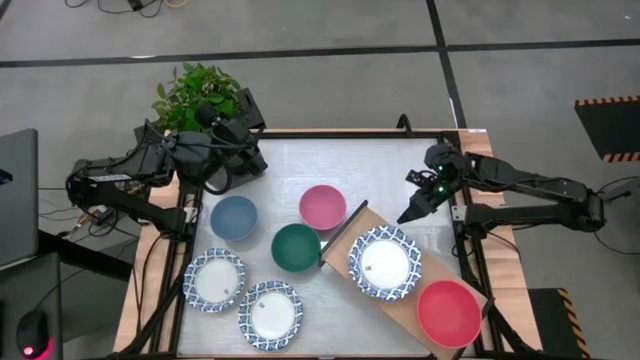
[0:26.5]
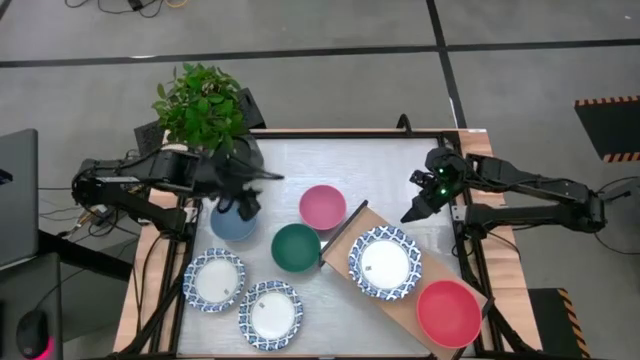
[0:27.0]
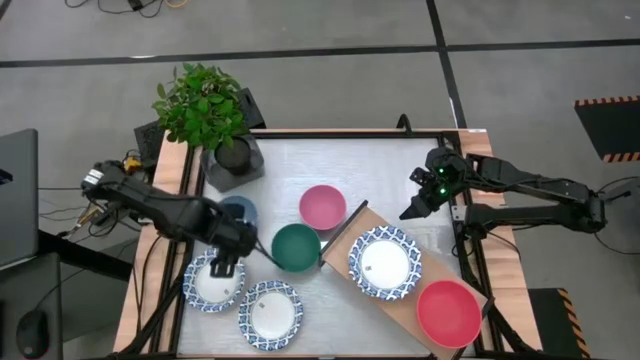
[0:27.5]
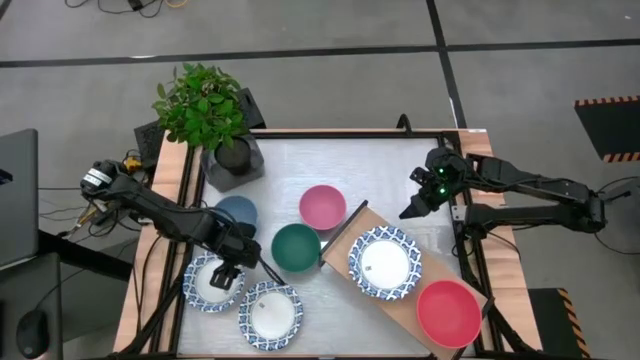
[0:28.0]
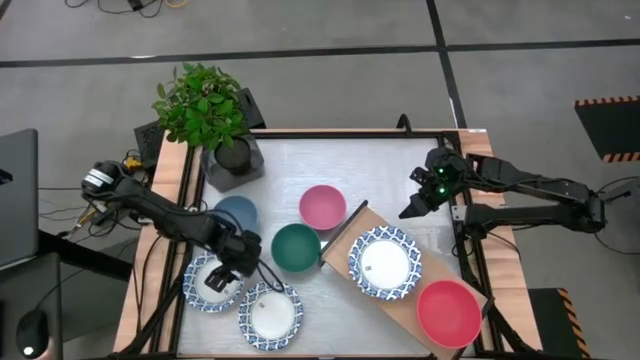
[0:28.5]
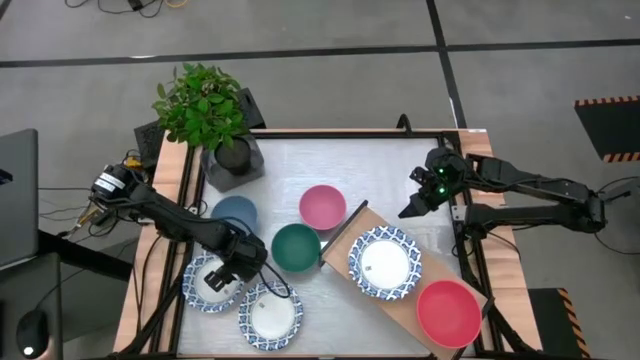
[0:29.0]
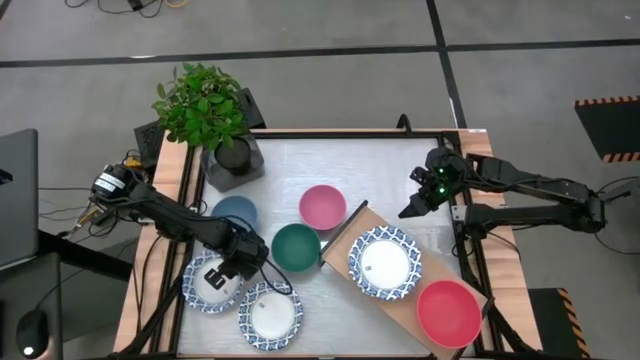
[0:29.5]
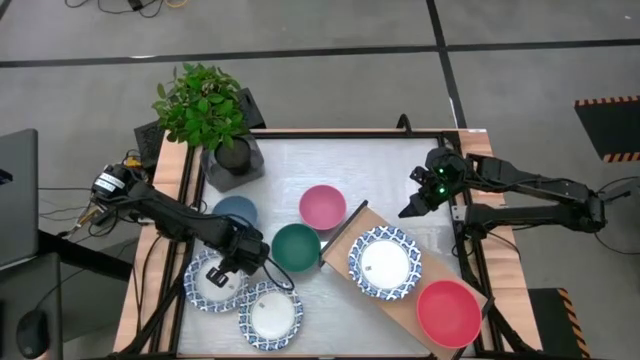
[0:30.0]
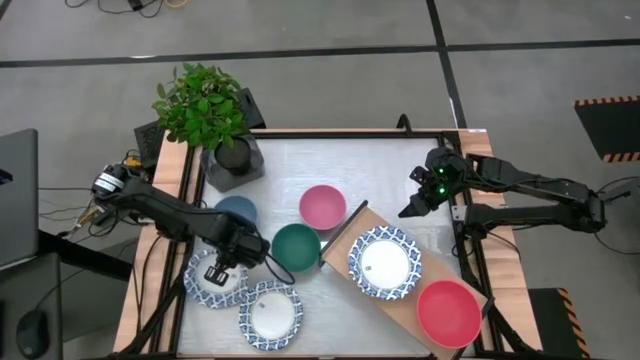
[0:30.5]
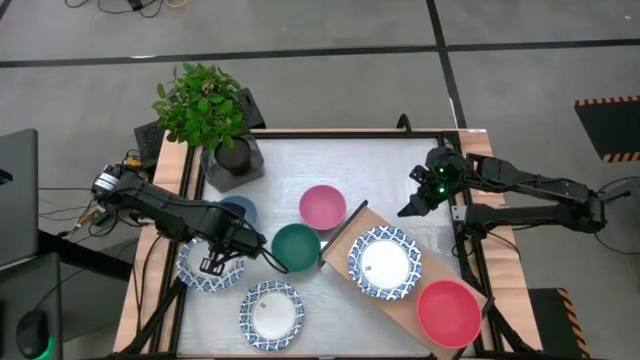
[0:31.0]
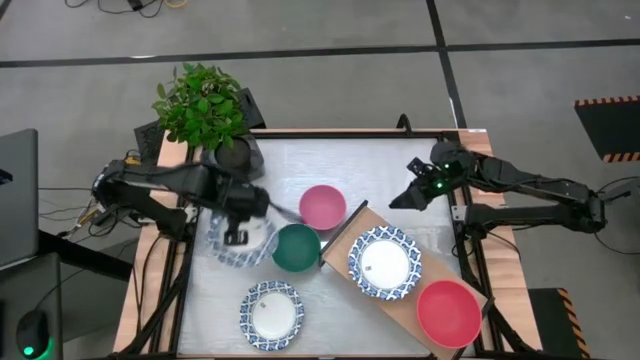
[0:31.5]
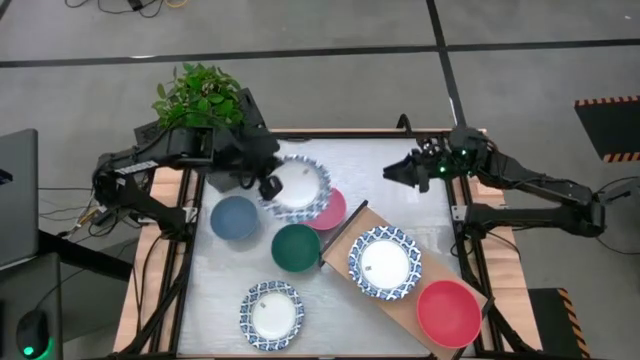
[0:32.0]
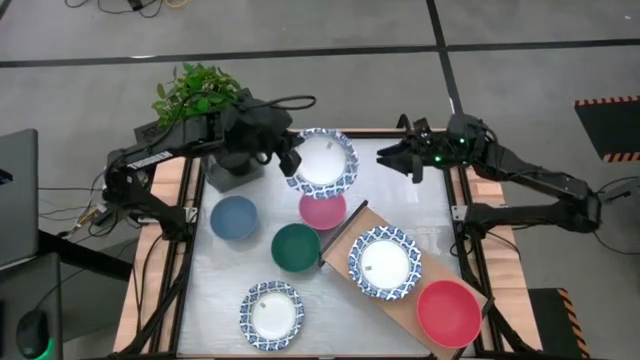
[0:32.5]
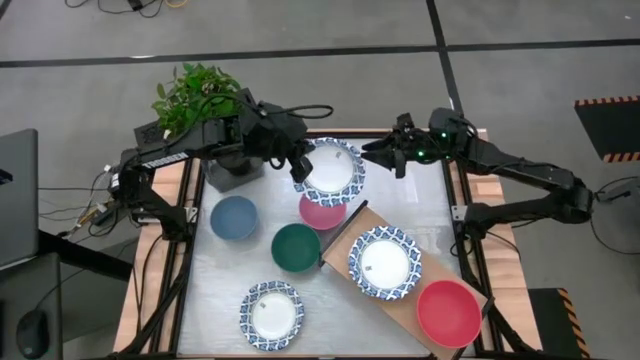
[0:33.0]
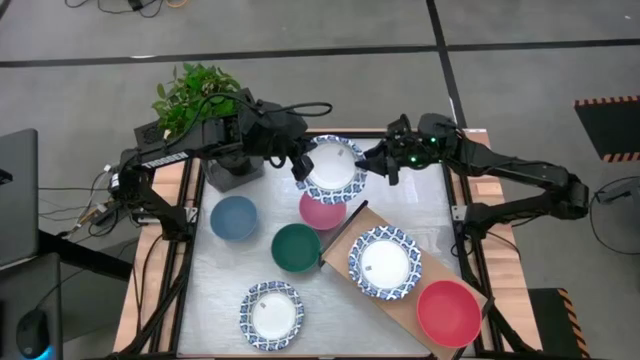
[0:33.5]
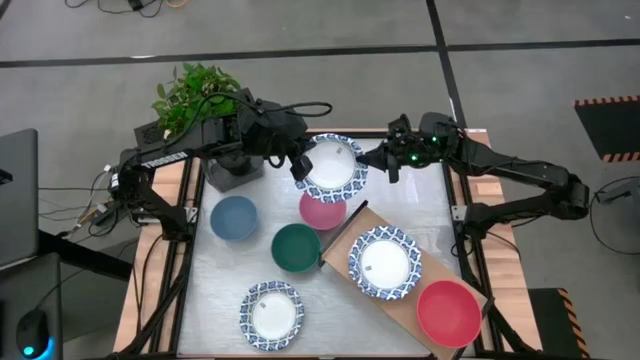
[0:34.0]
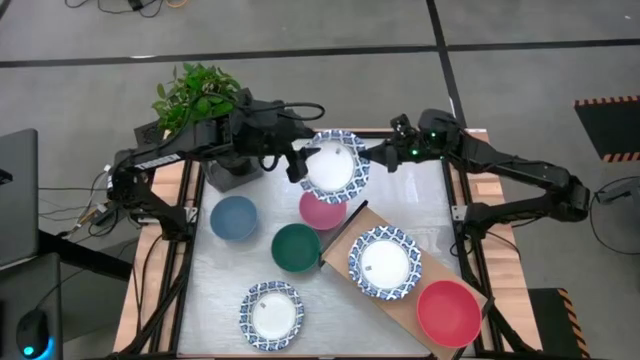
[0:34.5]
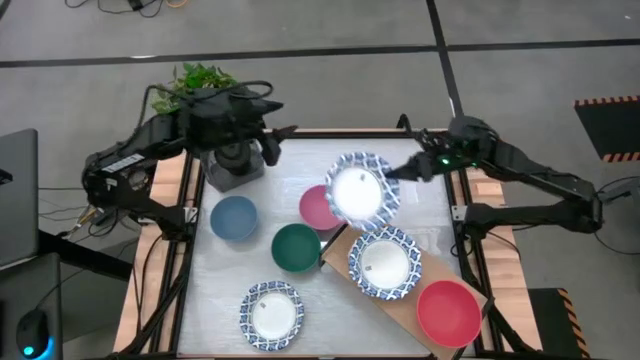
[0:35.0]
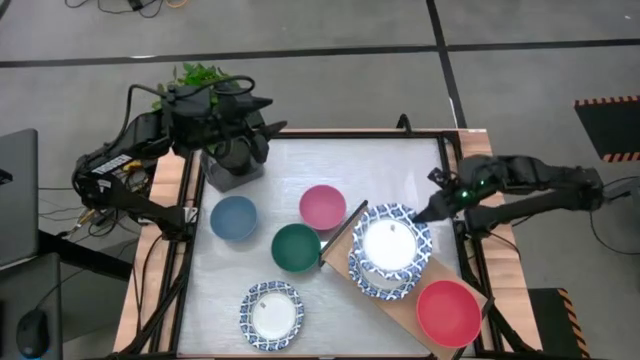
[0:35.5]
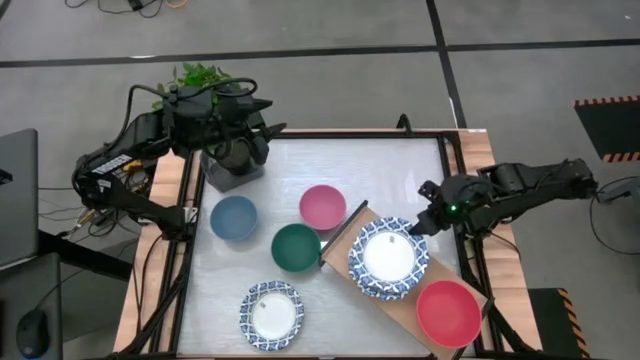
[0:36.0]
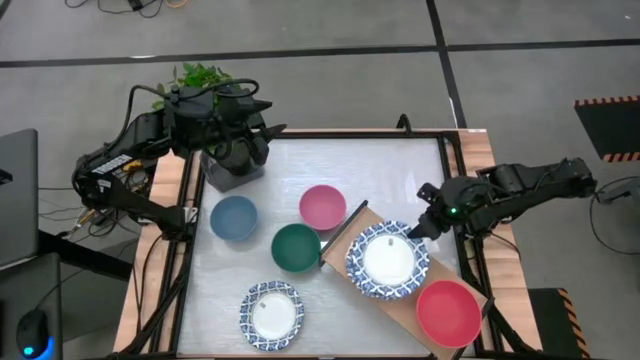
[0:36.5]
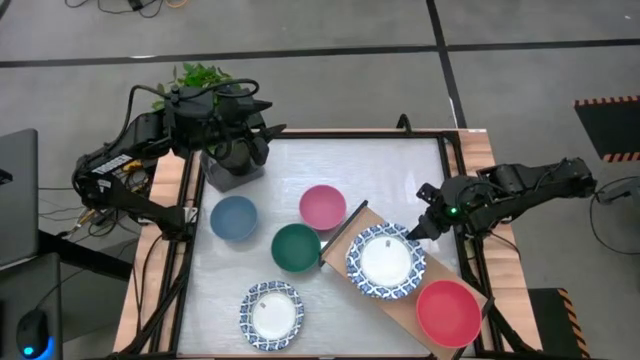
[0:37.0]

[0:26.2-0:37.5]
Task: Place and stack bowls onto a shelf
Stack the white patterned bowl on top of the white patterned bowl on the shelf

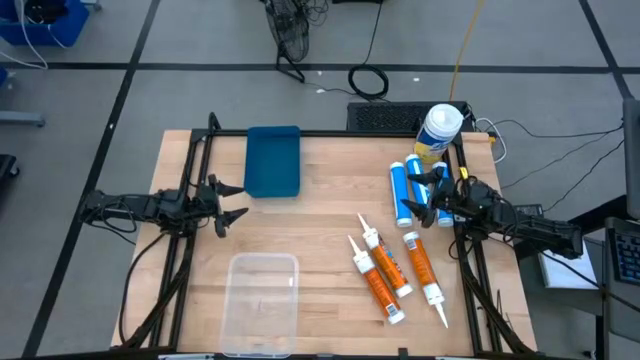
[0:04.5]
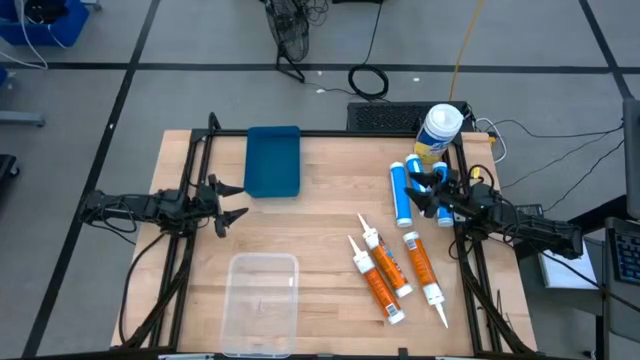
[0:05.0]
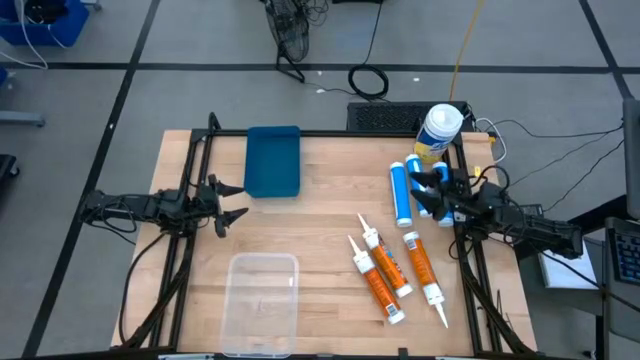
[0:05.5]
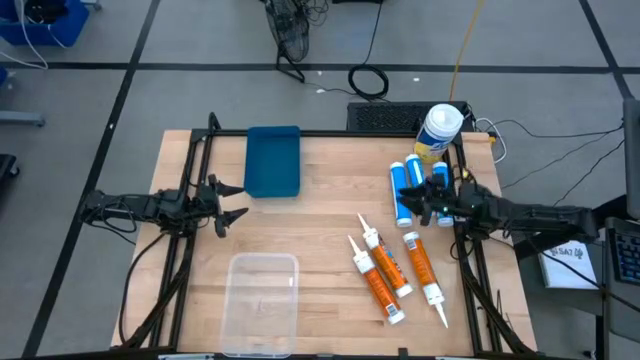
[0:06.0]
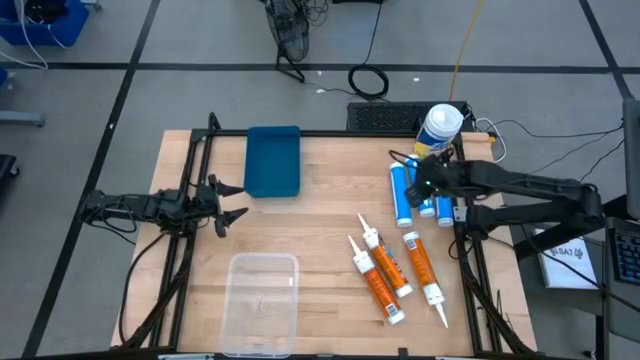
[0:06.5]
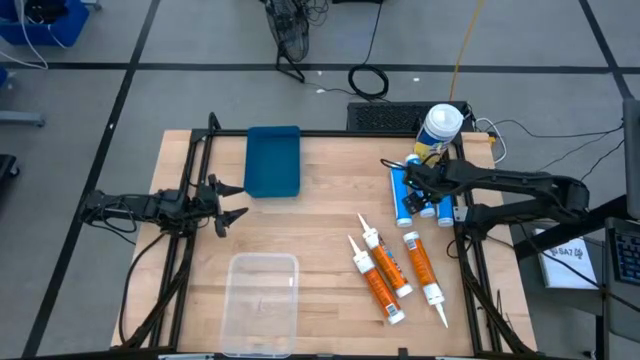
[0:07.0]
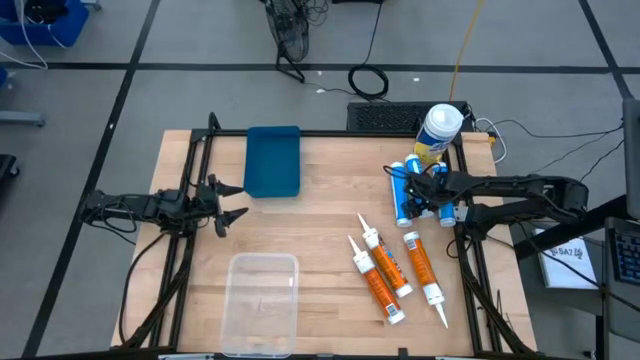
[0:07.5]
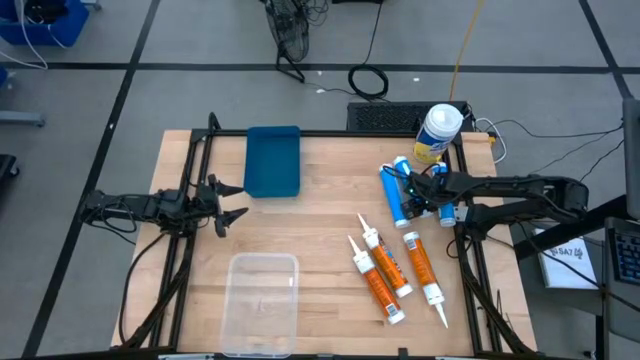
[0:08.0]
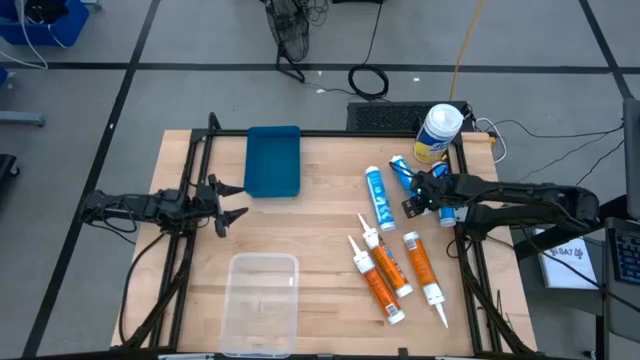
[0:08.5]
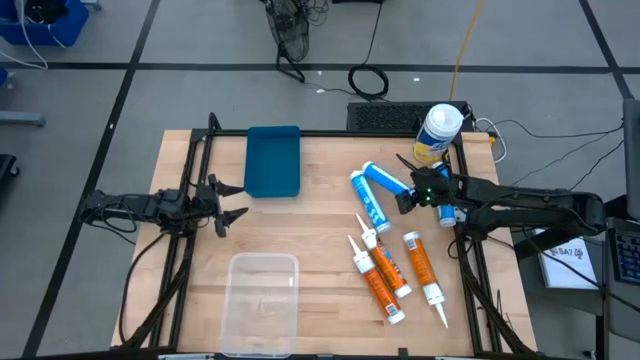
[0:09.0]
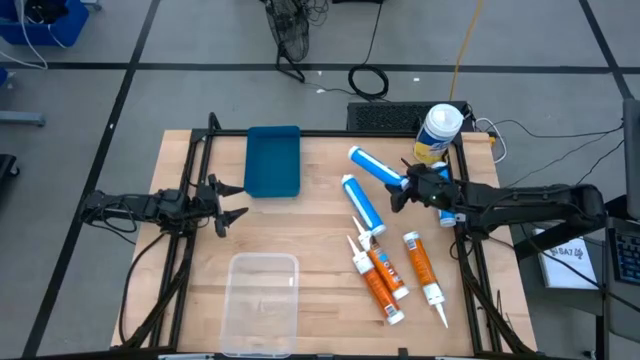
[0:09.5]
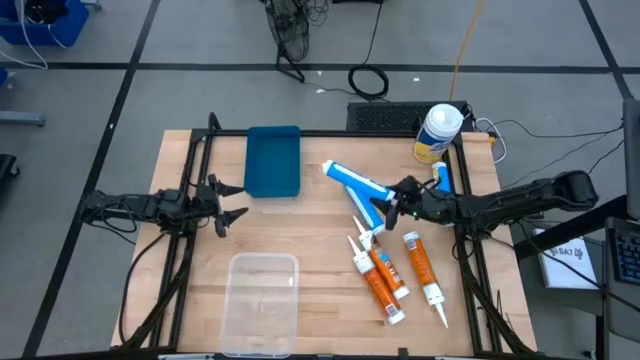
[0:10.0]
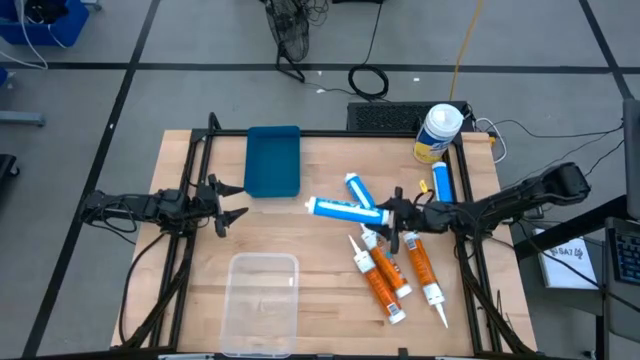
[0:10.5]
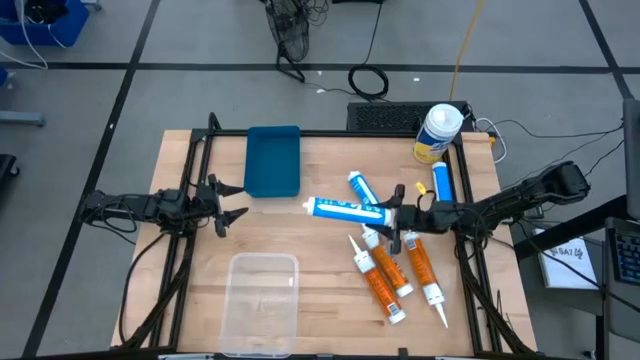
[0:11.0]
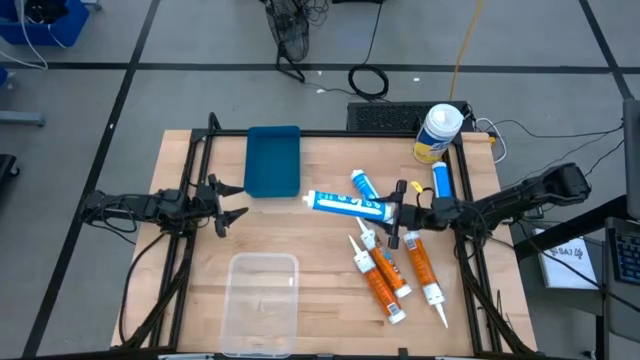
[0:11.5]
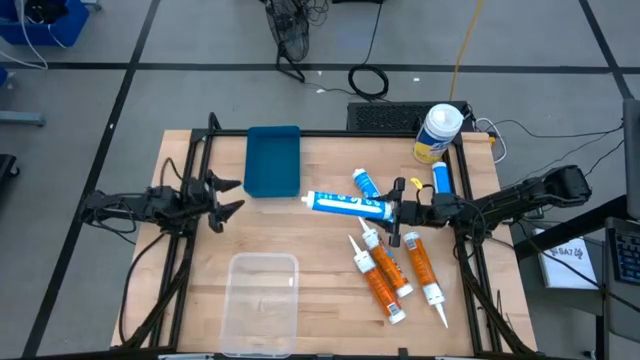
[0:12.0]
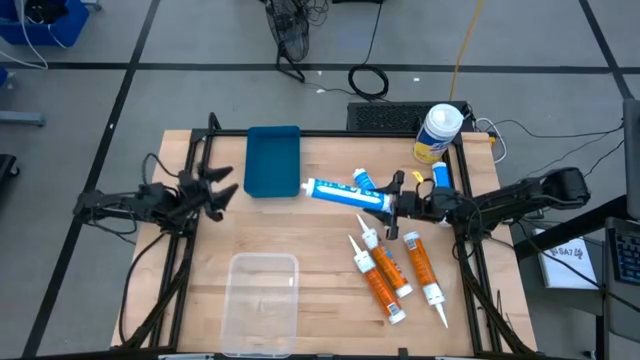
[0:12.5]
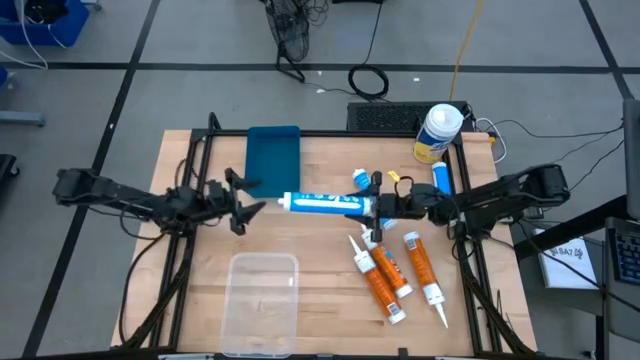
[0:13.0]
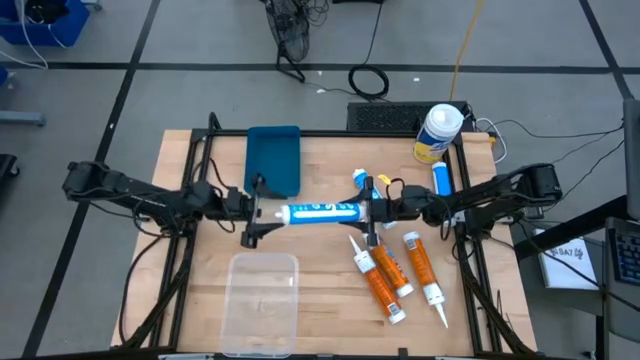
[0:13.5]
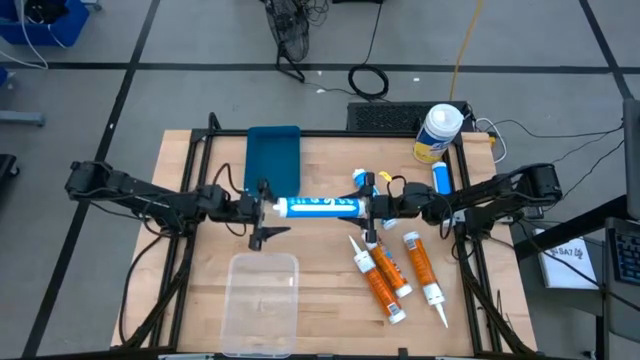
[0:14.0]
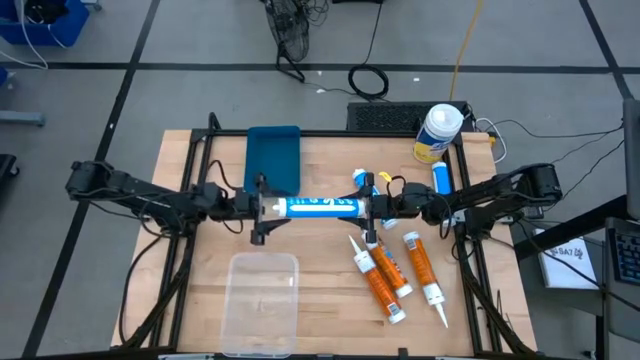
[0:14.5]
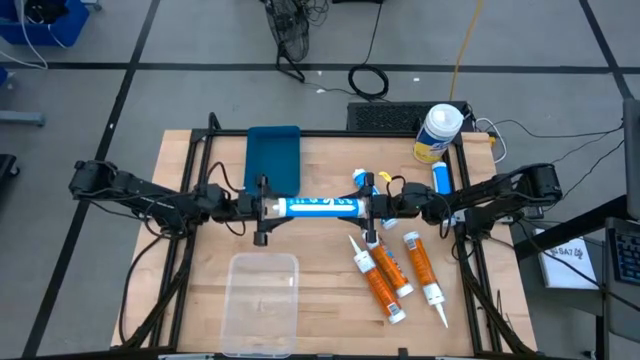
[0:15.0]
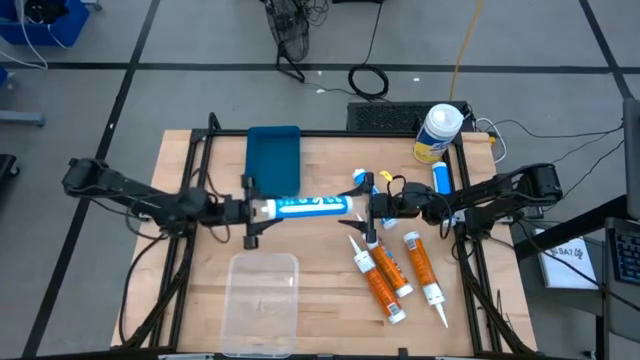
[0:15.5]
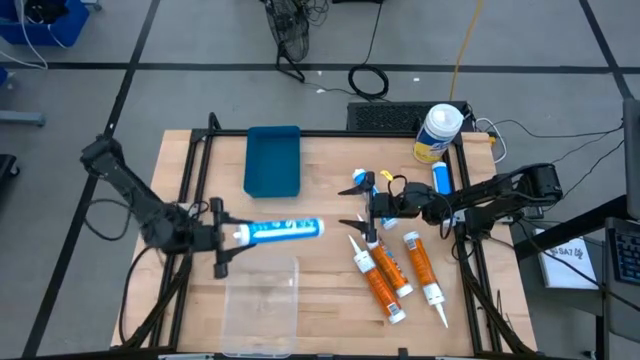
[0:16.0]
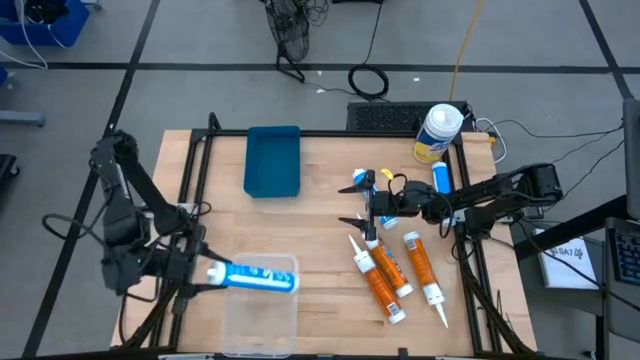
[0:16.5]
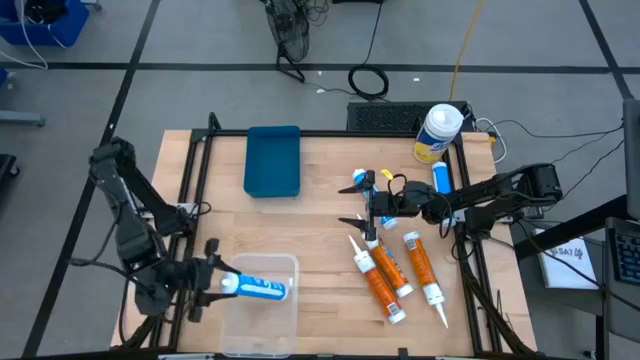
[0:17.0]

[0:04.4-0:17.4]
Task: Pick & place silicon tubes, Sealant and Lysol wipes
Put the middle blue sealant into the transparent bin
